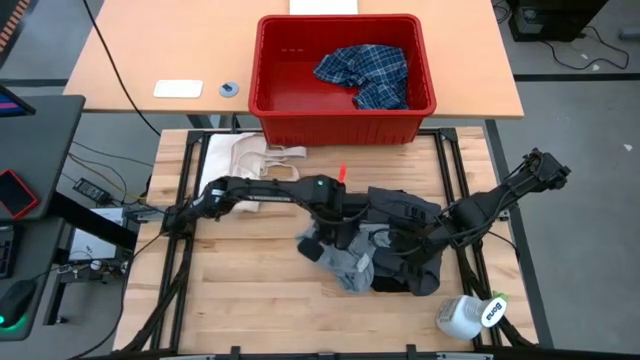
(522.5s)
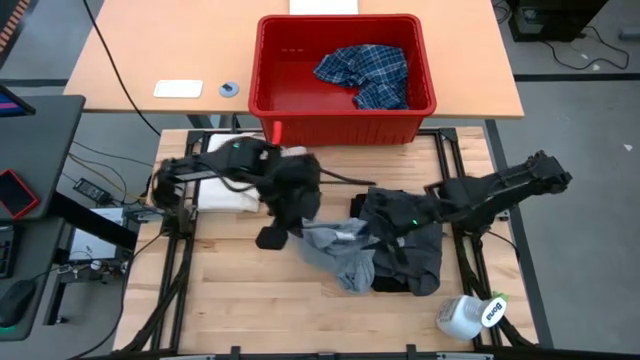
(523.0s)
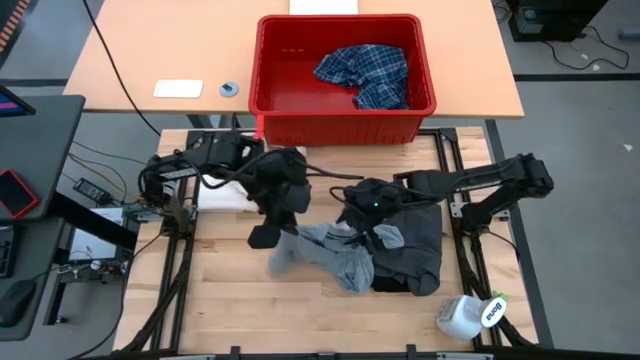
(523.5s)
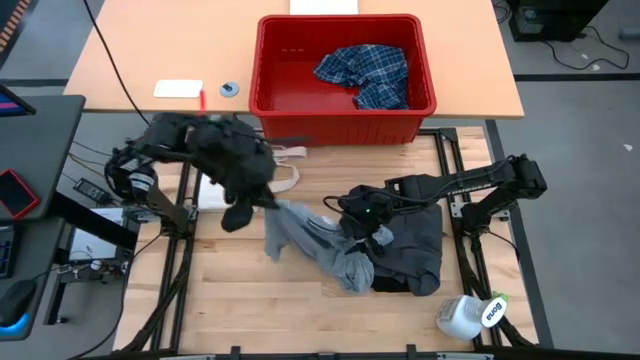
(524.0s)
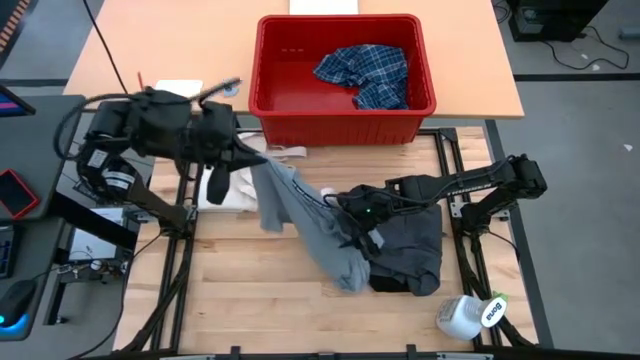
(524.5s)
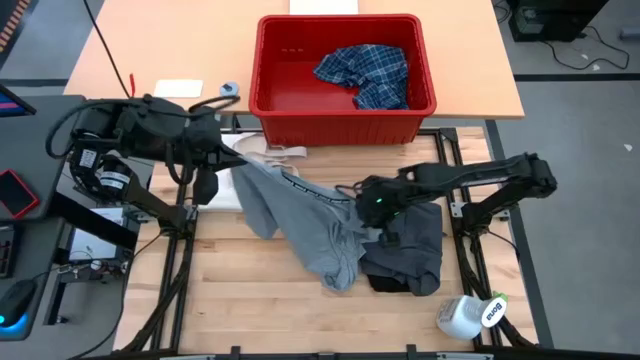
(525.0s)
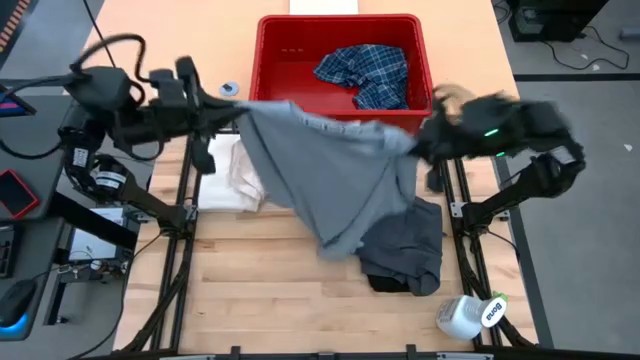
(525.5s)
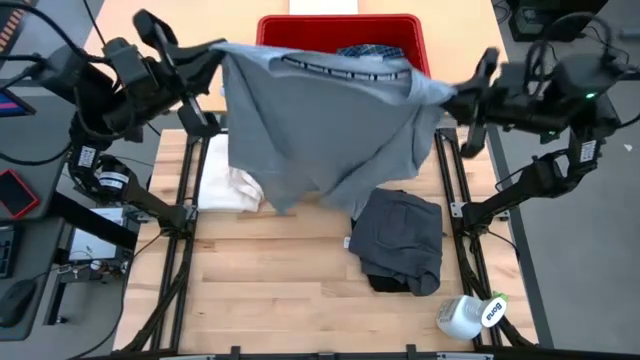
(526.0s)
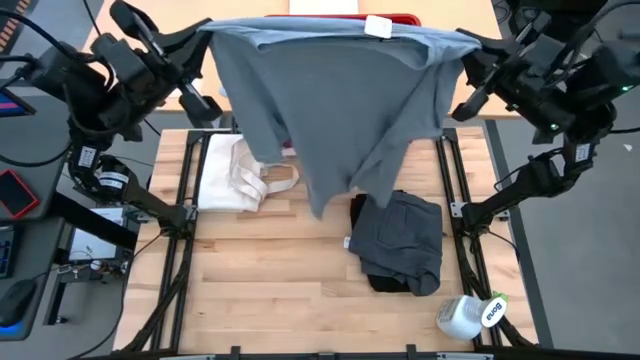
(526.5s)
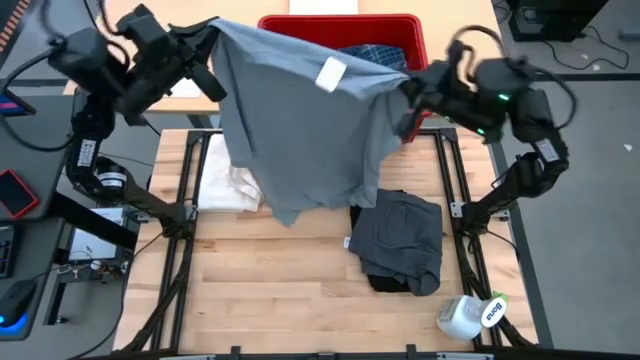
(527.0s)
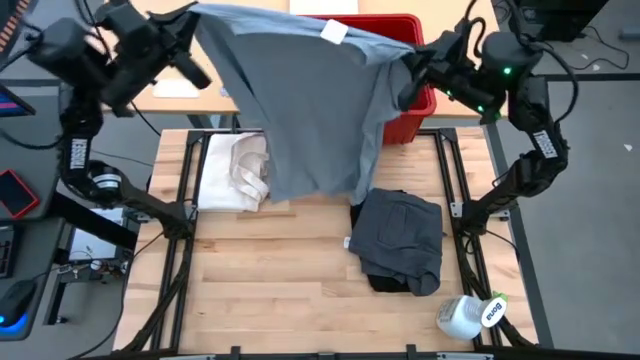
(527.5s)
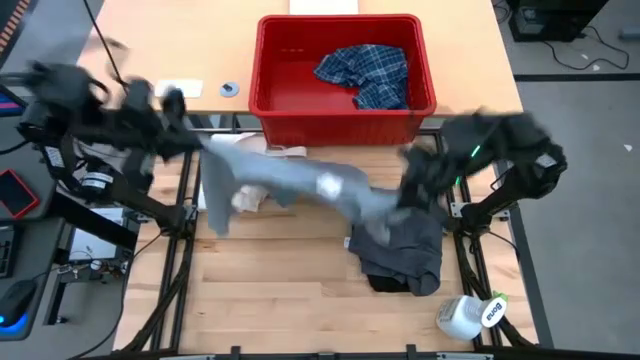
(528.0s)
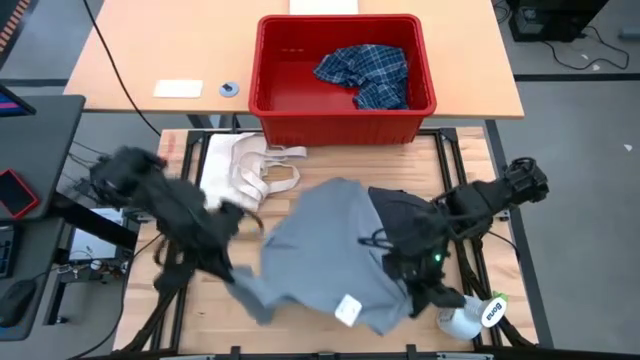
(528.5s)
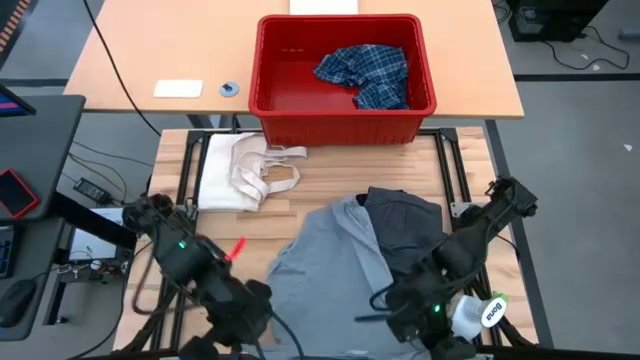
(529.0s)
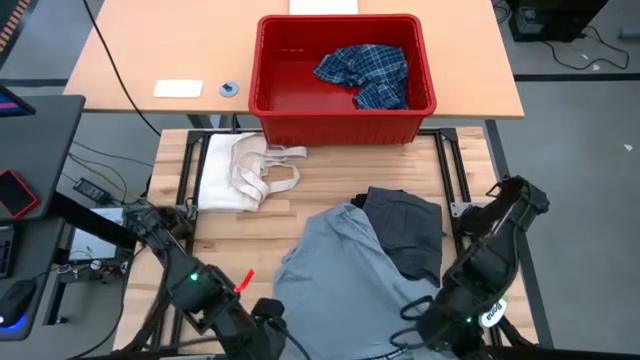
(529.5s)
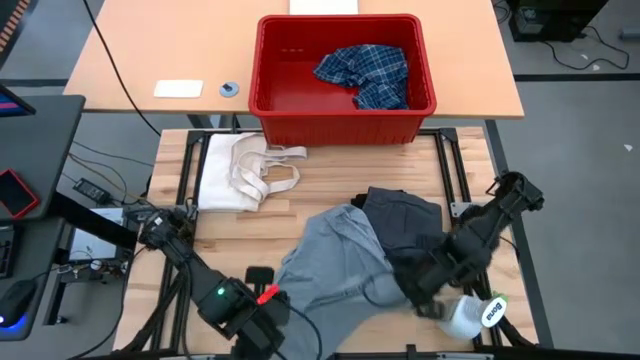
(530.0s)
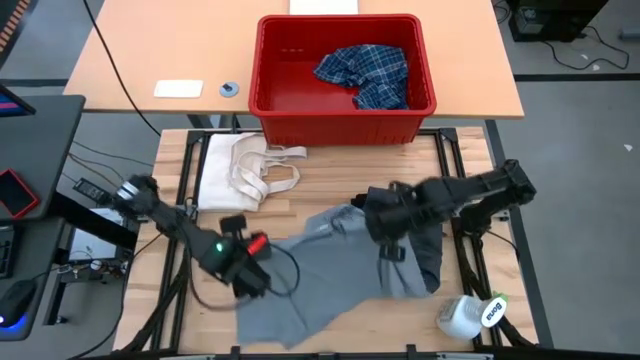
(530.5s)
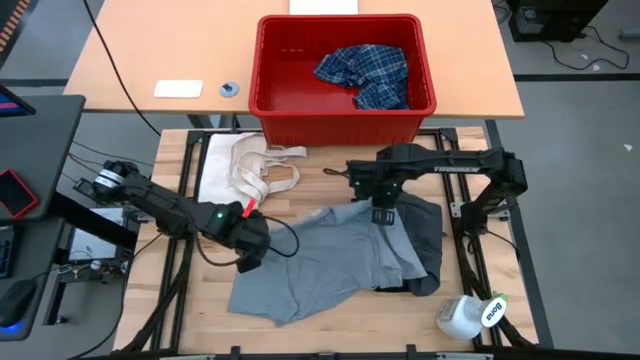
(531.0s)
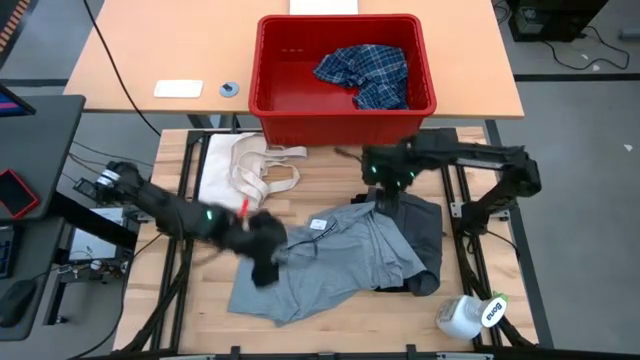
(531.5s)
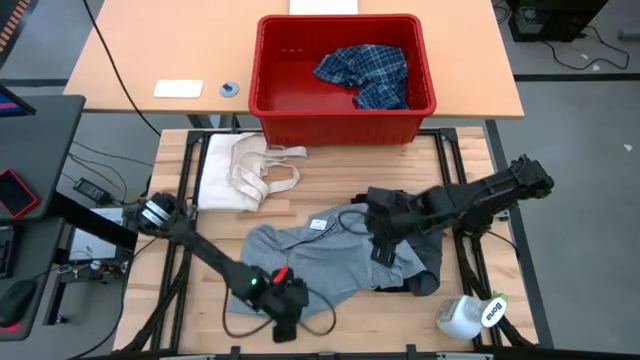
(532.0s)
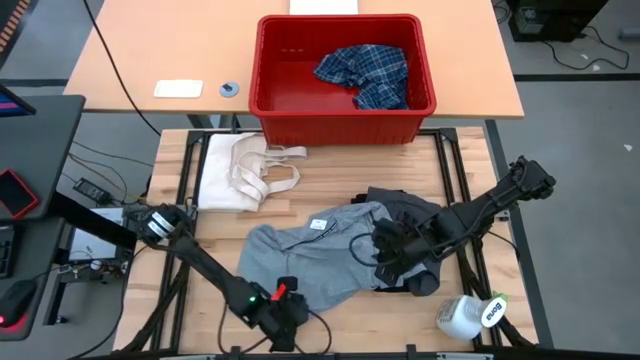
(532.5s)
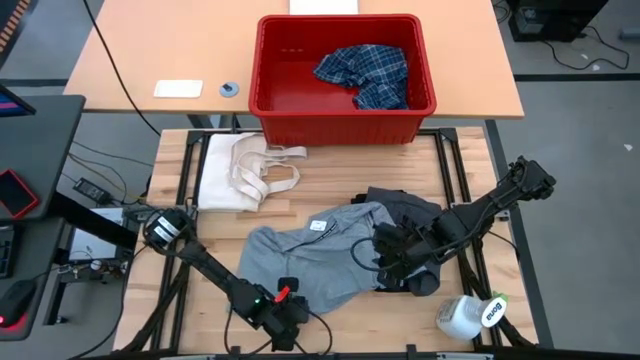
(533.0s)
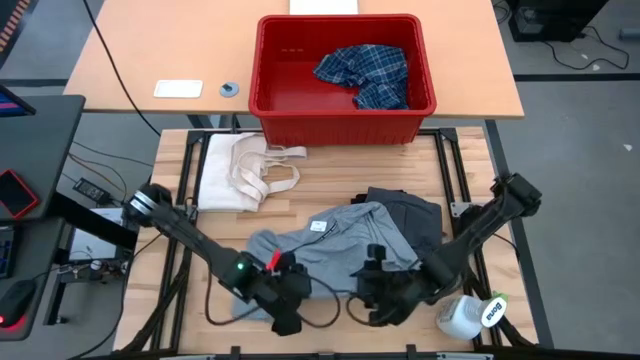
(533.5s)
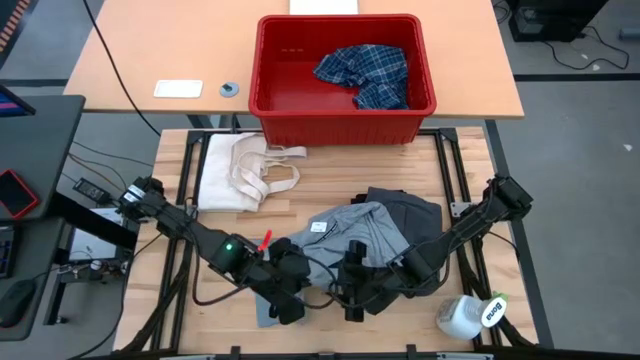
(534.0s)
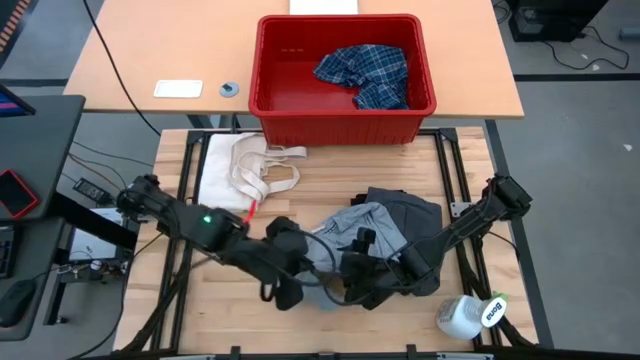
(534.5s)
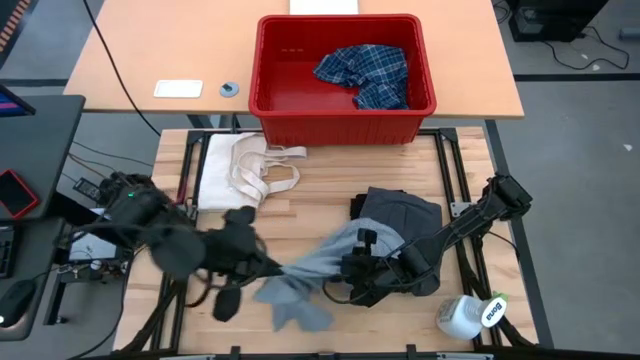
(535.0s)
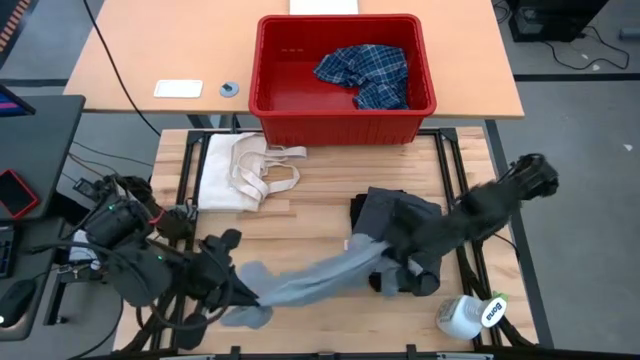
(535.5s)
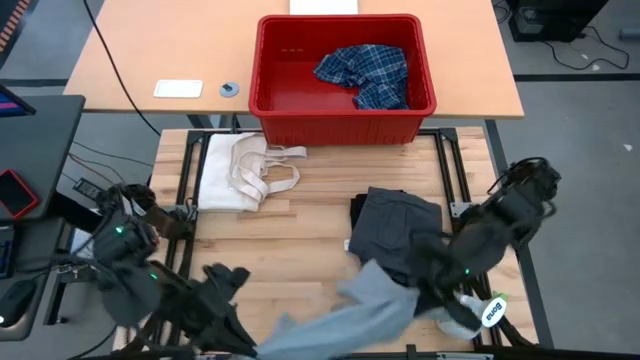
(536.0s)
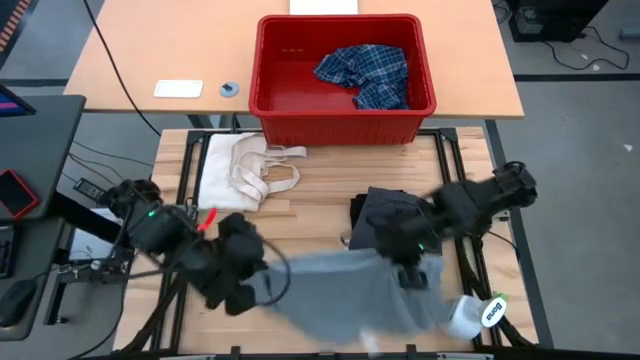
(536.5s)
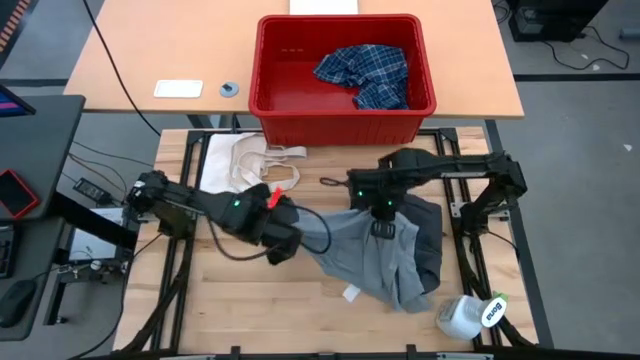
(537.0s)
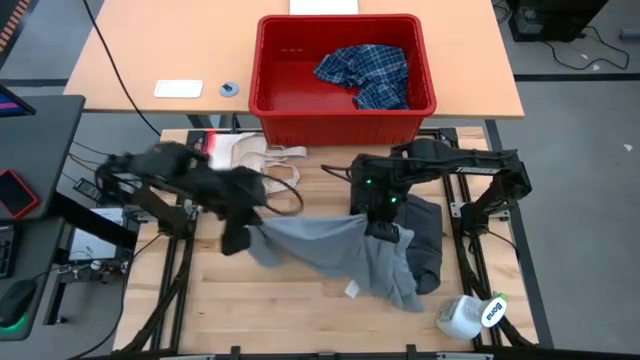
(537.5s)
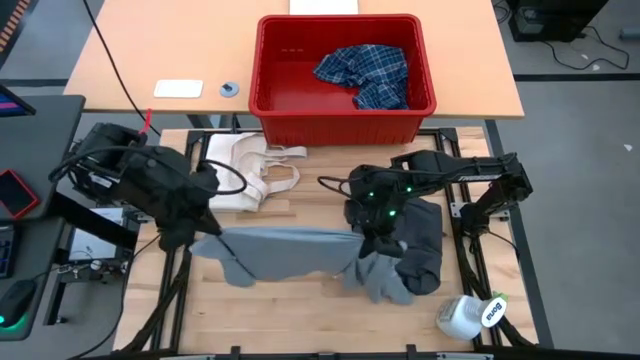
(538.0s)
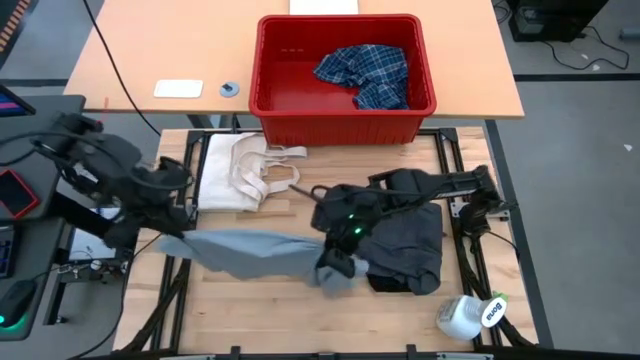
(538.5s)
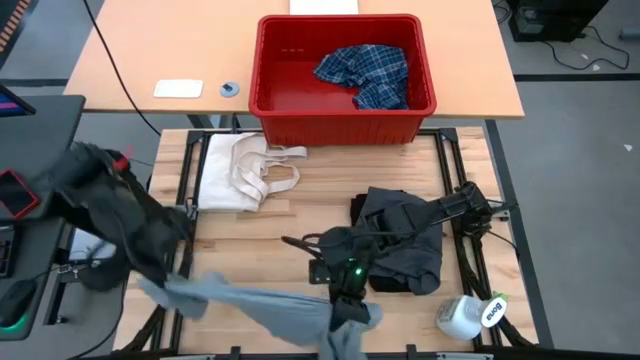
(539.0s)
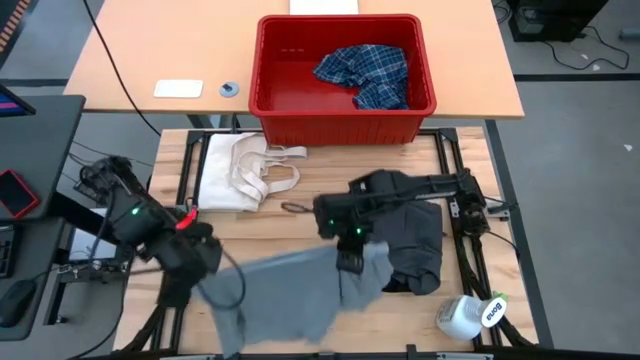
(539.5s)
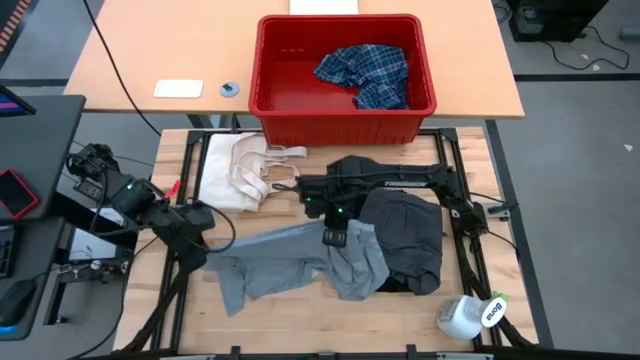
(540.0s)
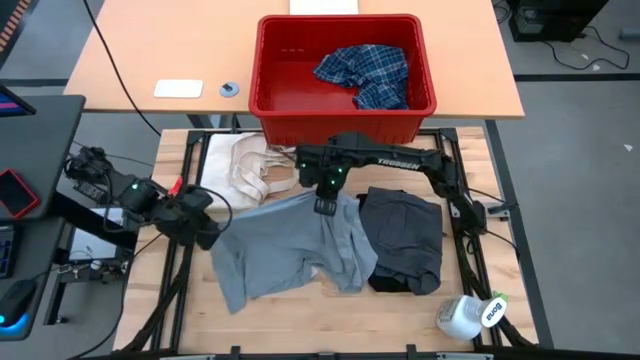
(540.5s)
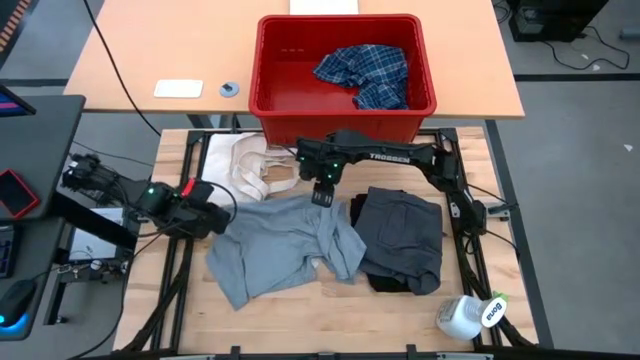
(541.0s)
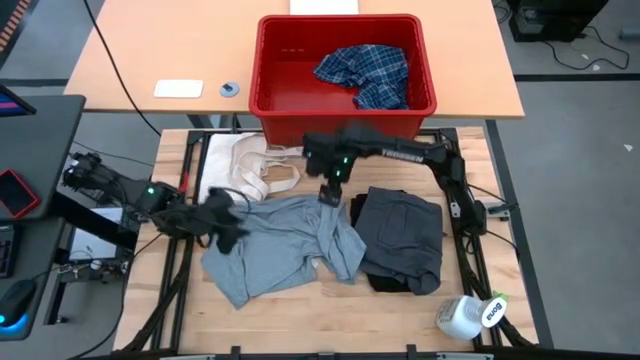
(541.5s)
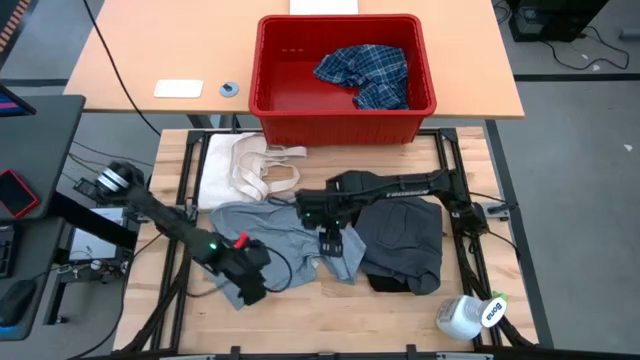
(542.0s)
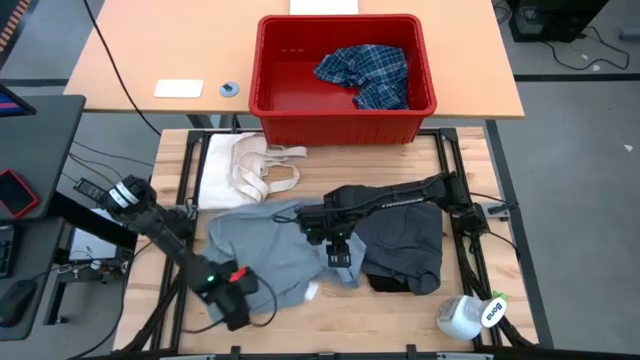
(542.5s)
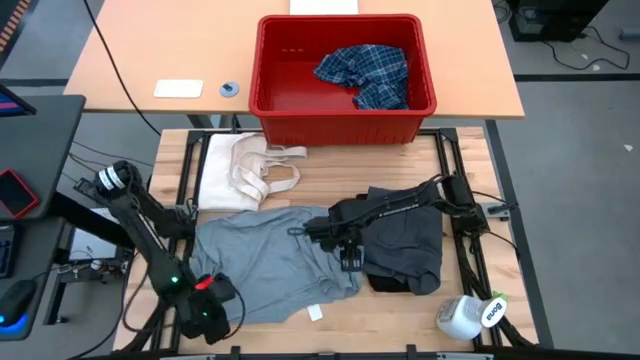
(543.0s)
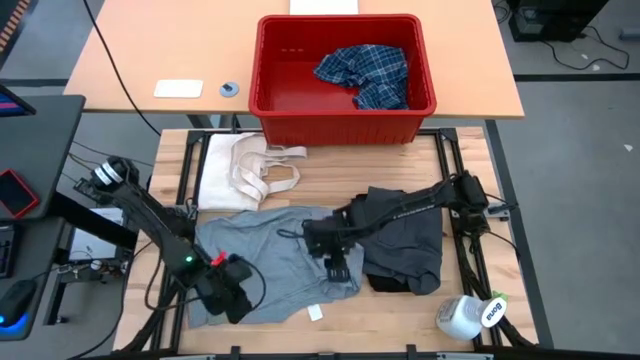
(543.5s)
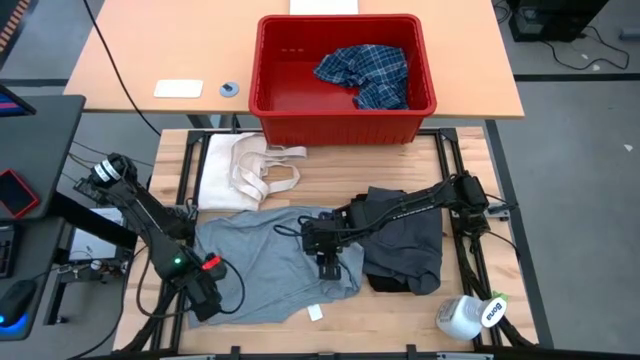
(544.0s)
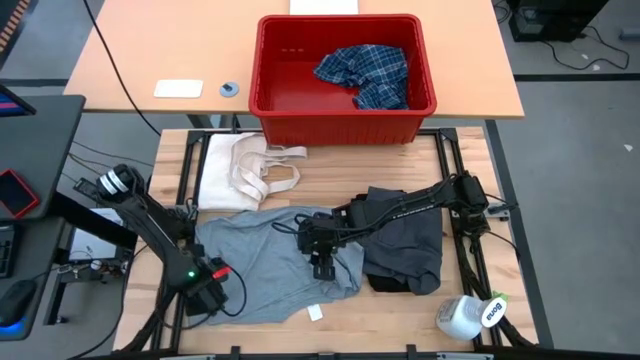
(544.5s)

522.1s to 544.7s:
Task: Fold Laundry from Bin
Fold the gray shirt
